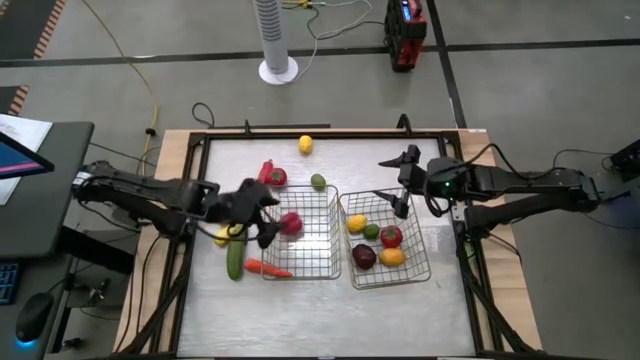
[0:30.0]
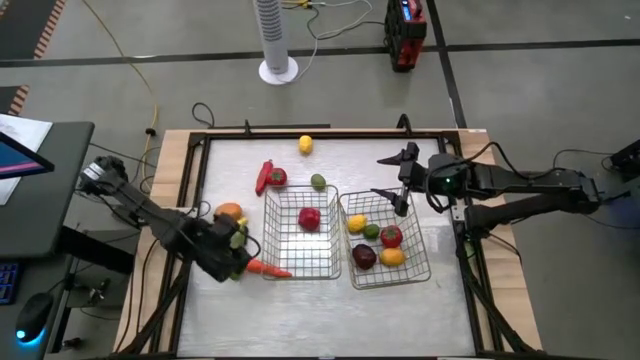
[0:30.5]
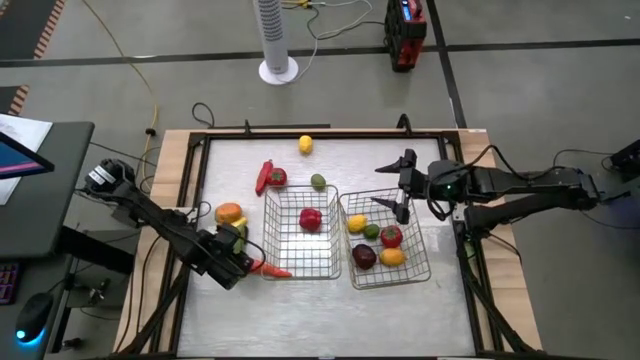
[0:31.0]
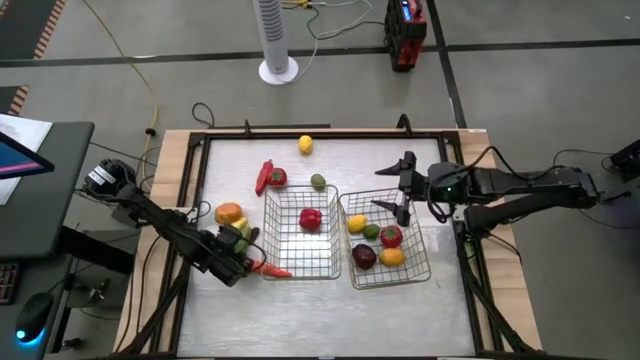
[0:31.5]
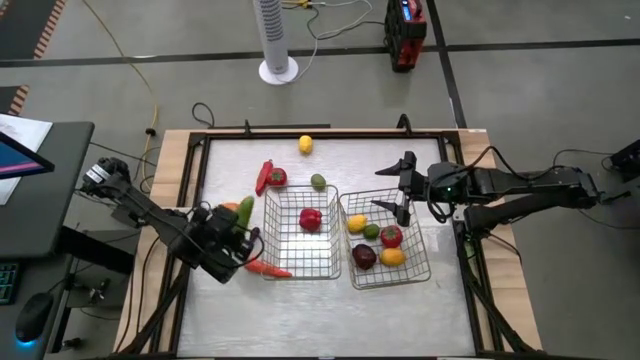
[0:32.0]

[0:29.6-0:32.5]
Task: Sort produce into baskets
Put the cucumber into the left wire basket

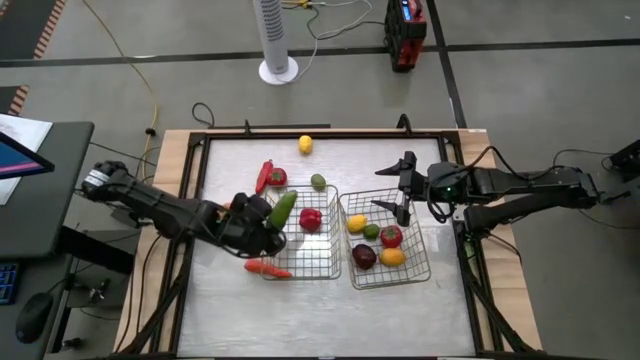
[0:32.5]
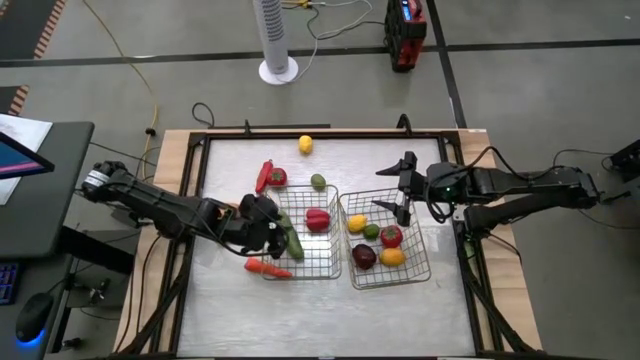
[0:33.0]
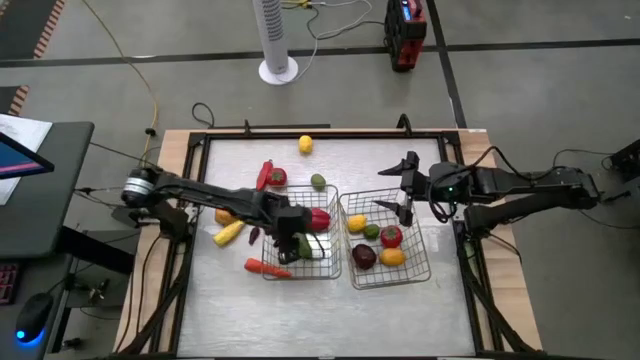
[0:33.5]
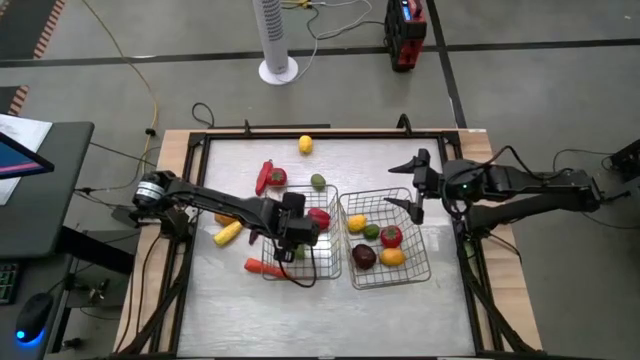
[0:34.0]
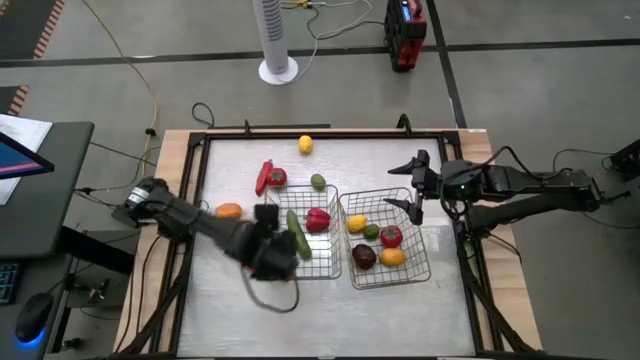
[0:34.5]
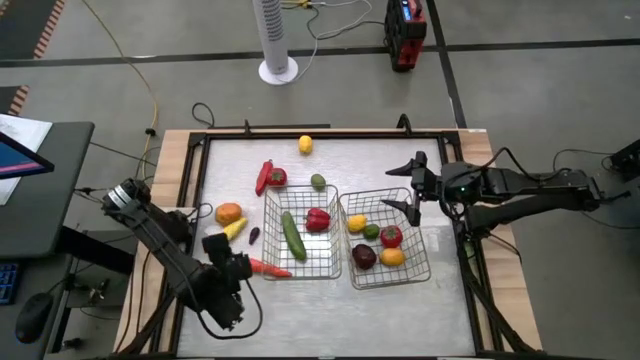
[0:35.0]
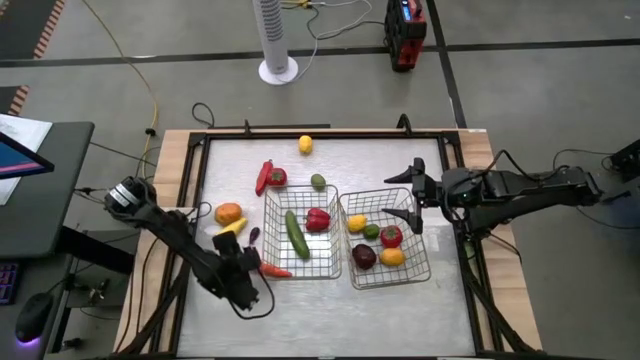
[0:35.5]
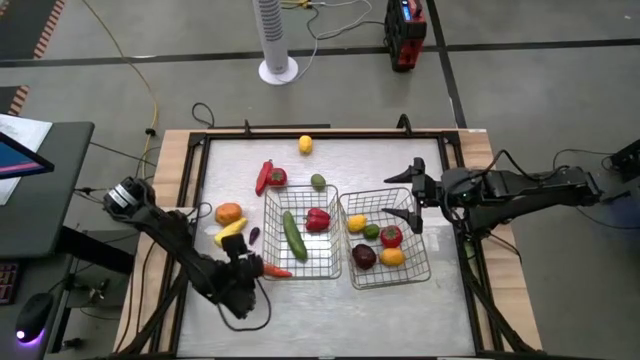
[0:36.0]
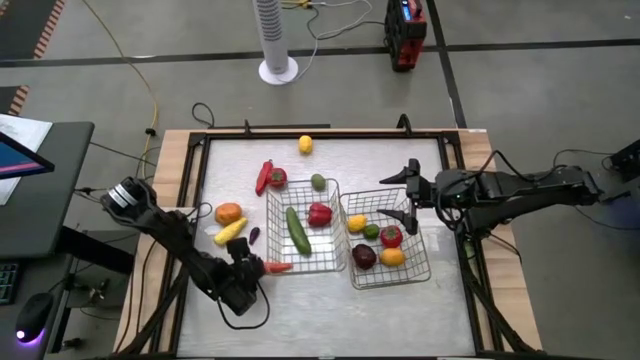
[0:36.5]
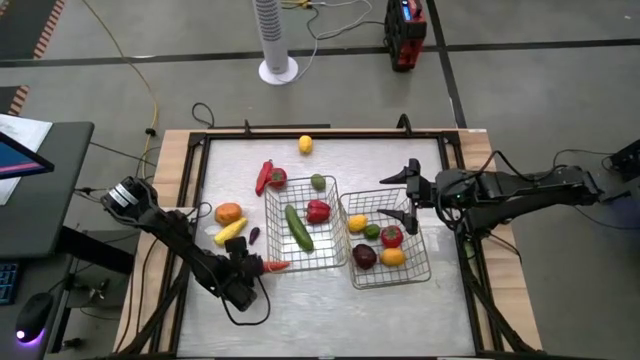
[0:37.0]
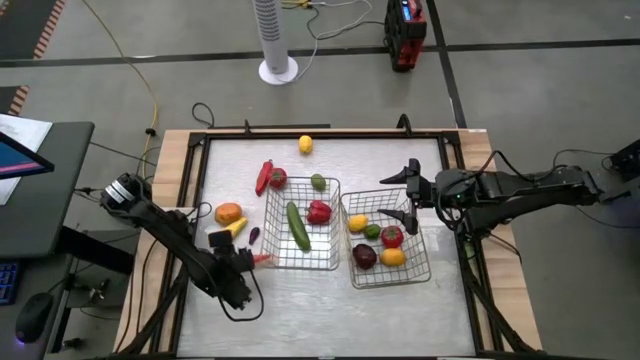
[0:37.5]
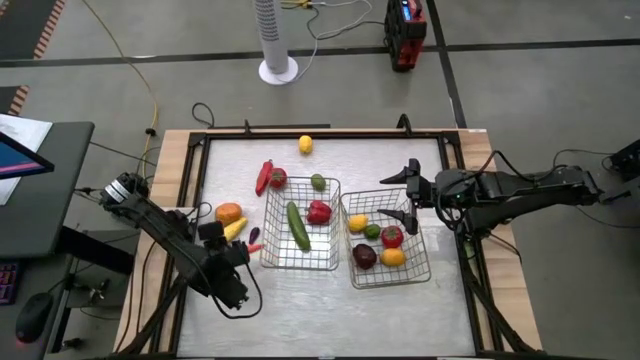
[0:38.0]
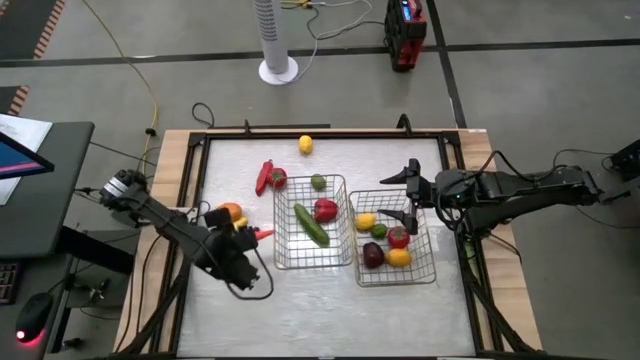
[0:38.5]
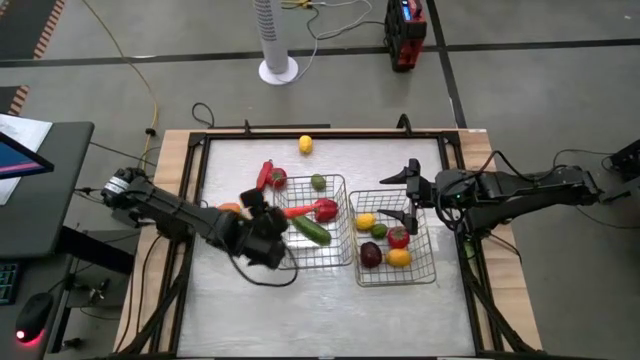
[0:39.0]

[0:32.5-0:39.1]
Put the carrot into the left wire basket

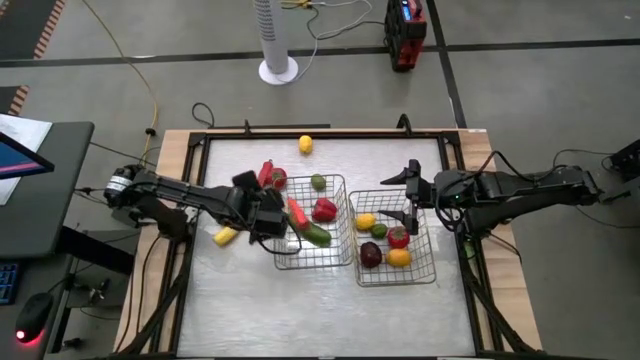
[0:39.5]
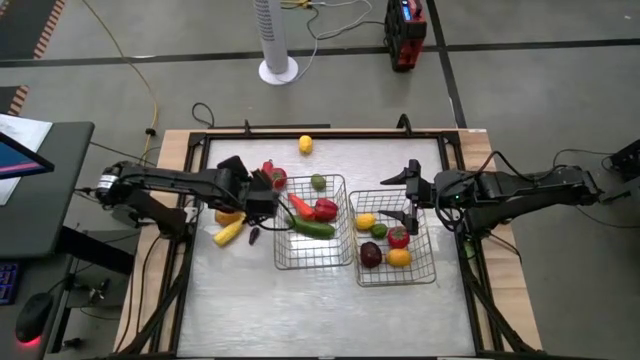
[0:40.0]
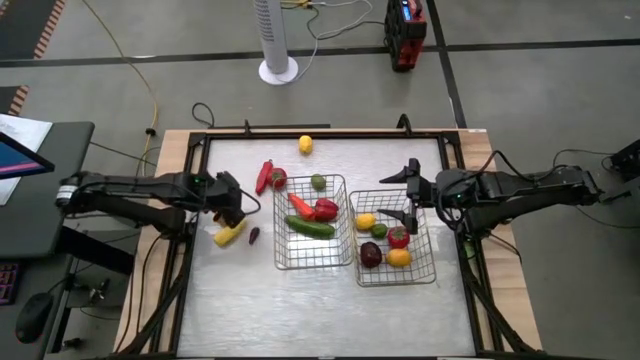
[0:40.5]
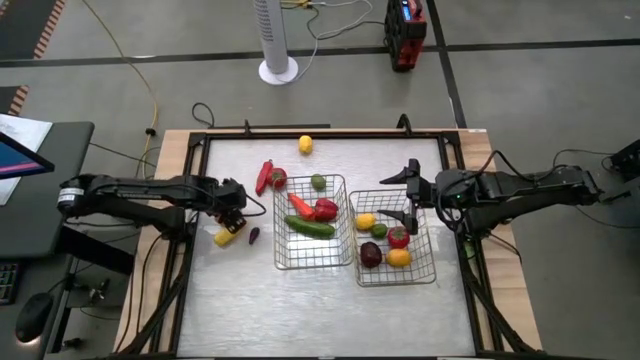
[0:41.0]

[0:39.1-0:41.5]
Put the potato into the left wire basket

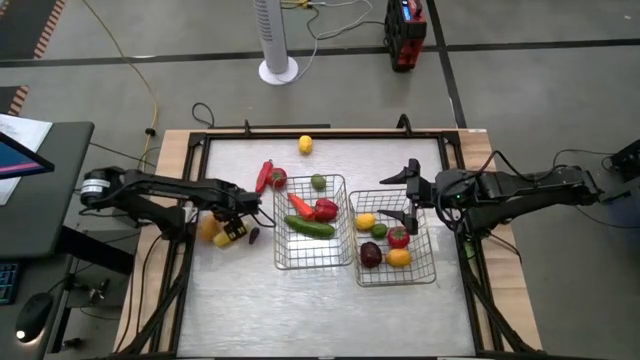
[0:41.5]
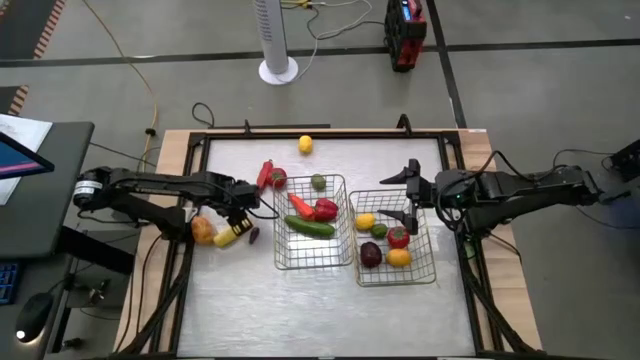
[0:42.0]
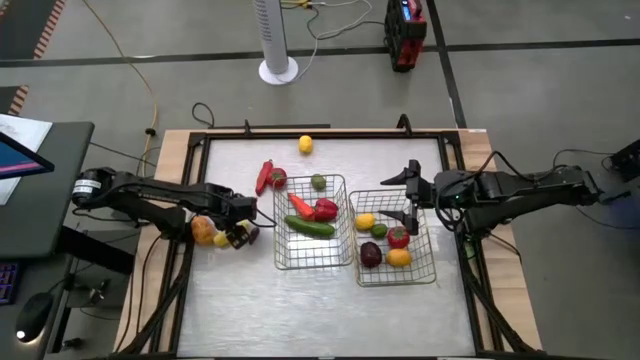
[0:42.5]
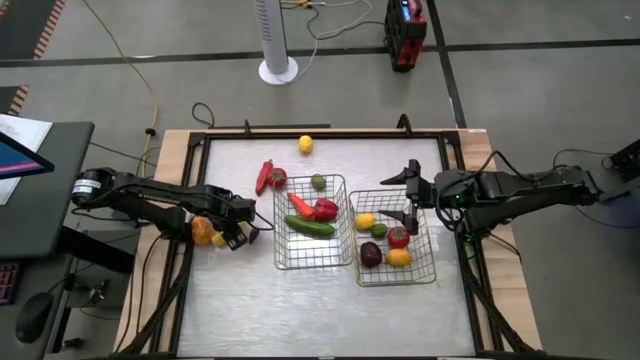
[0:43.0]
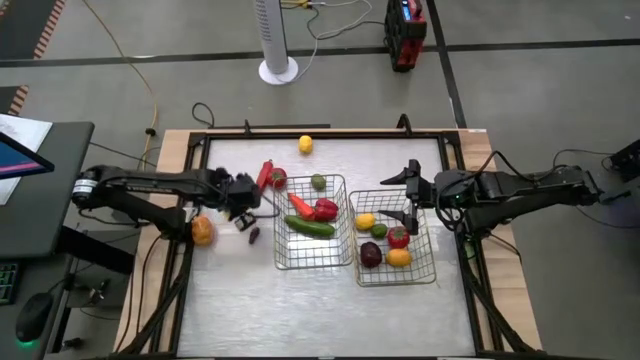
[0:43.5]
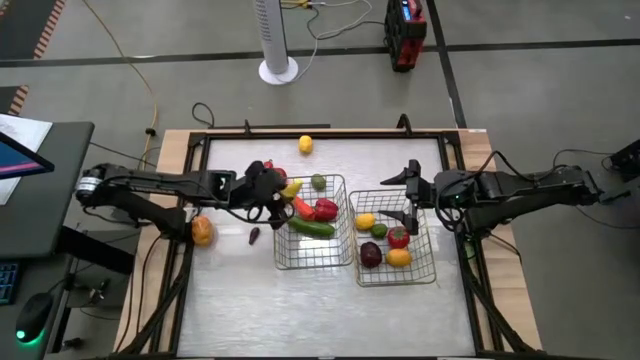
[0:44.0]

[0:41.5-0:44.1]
Put the corn into the left wire basket

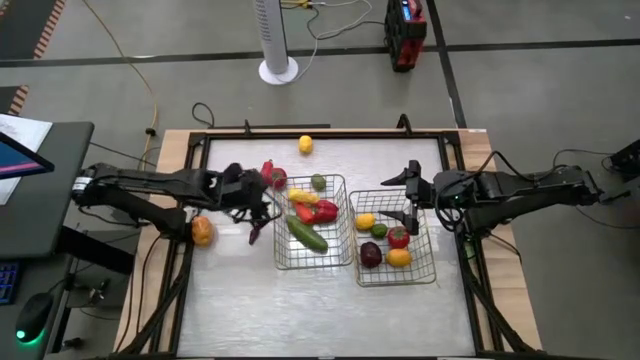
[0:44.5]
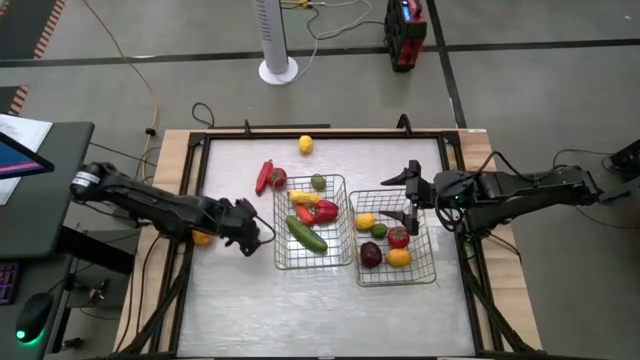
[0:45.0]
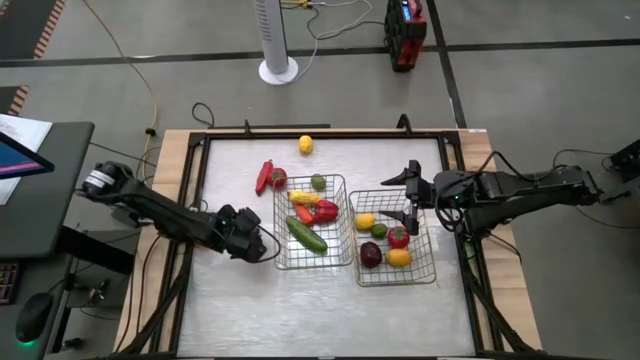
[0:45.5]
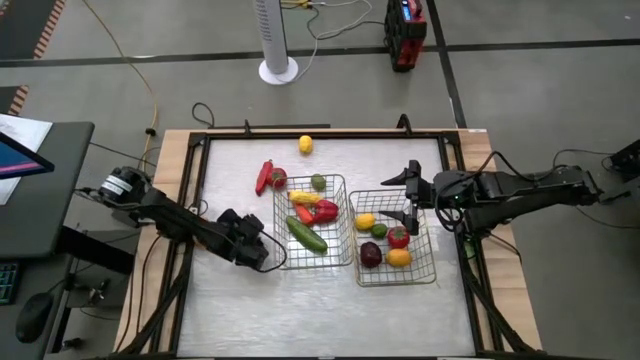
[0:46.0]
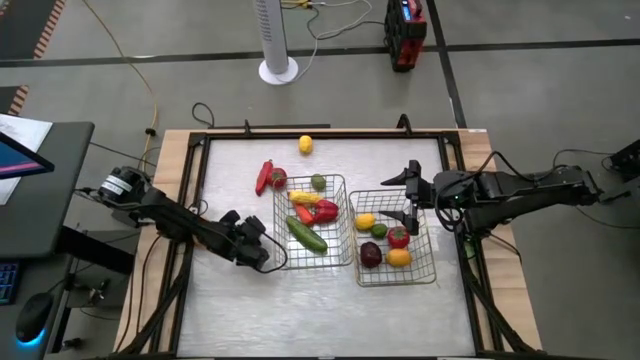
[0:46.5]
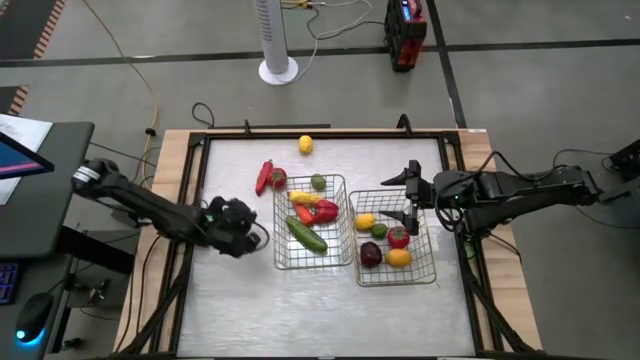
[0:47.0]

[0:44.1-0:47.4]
Put the eggplant into the left wire basket

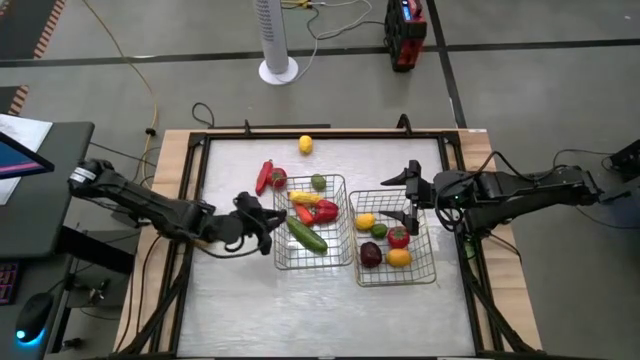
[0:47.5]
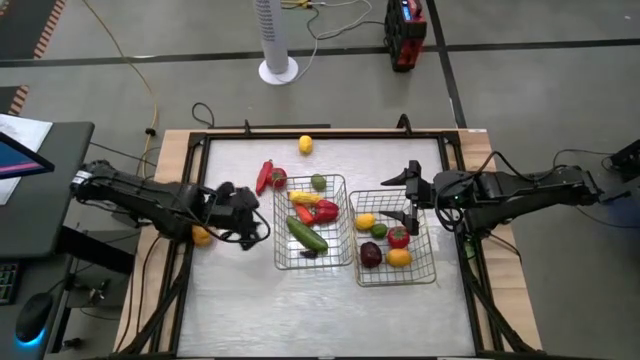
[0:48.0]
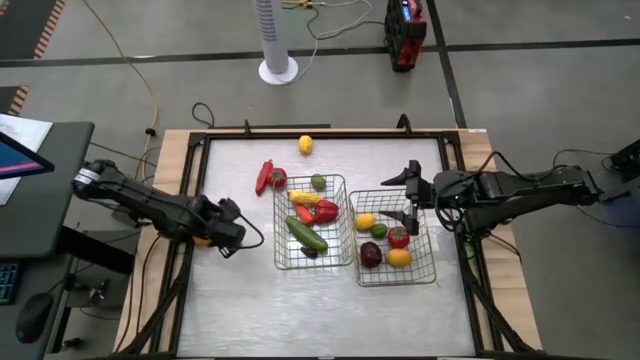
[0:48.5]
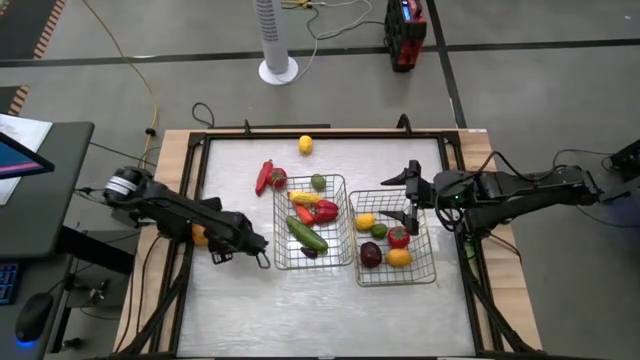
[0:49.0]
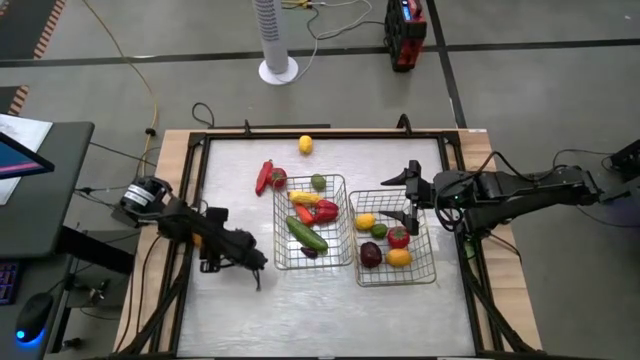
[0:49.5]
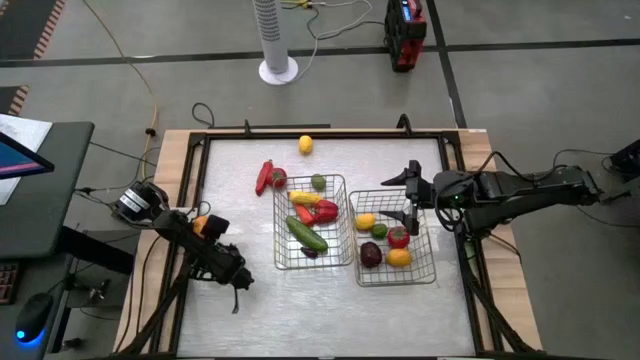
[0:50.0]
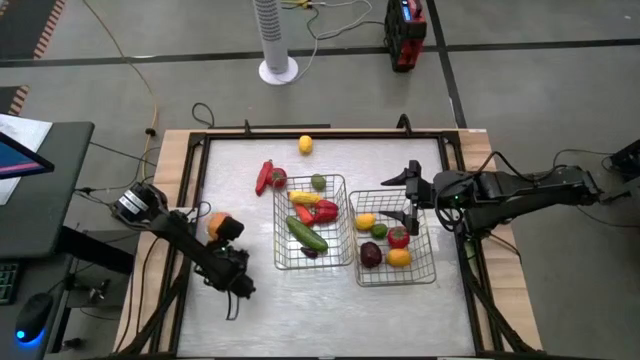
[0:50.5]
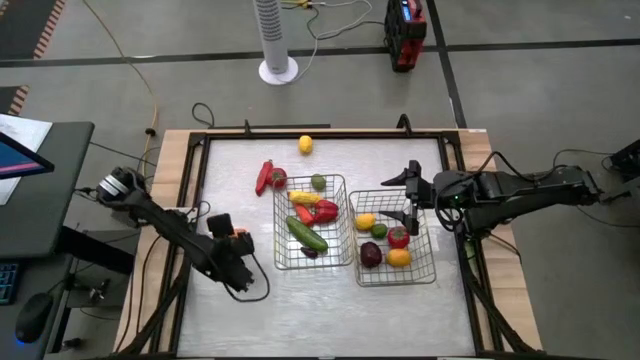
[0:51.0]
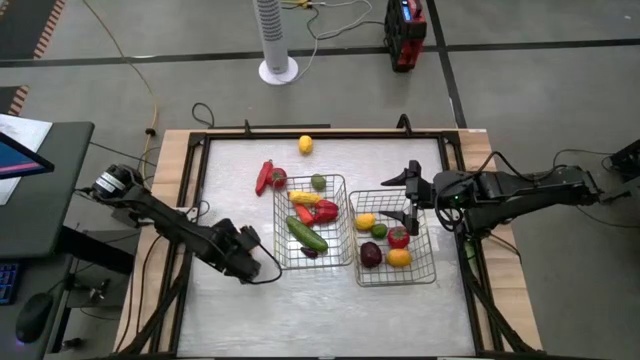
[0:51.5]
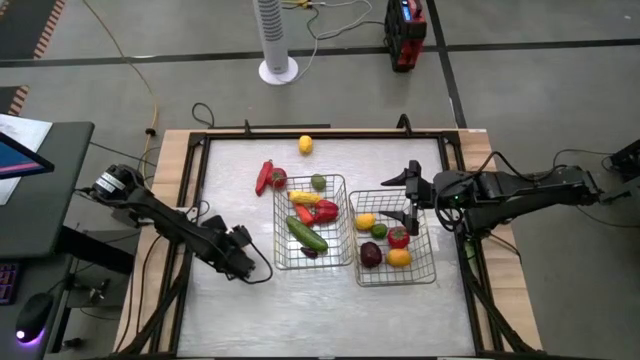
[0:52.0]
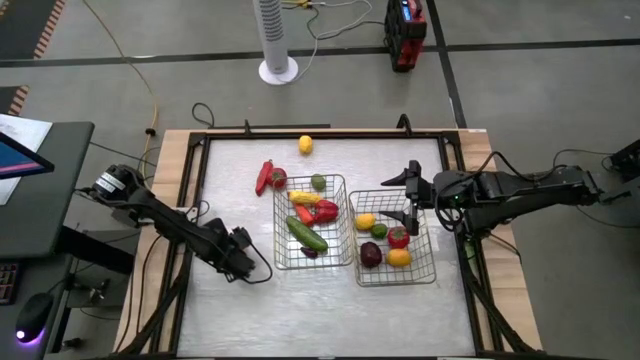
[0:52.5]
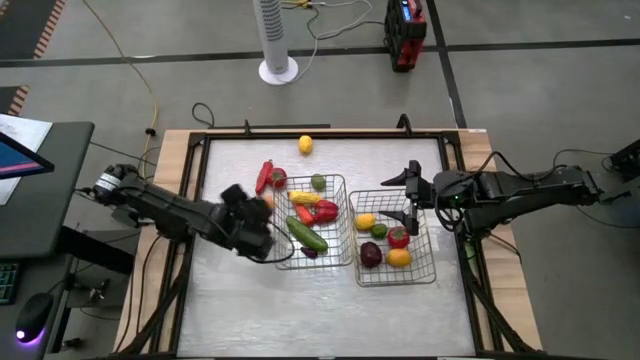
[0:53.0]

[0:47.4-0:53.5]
Put the potato into the left wire basket
